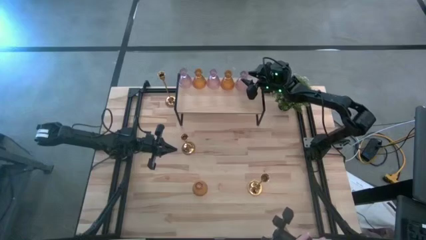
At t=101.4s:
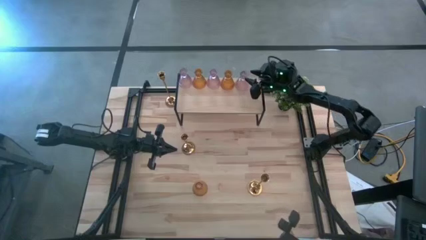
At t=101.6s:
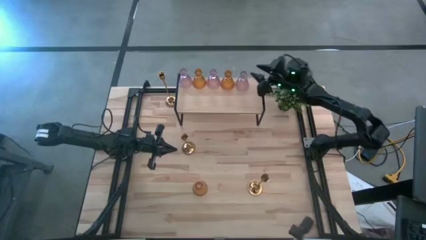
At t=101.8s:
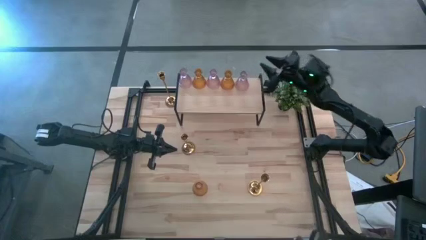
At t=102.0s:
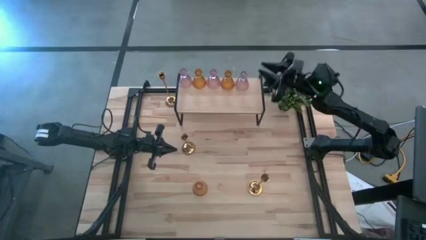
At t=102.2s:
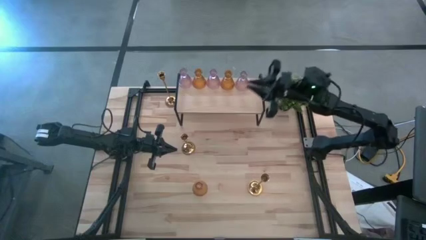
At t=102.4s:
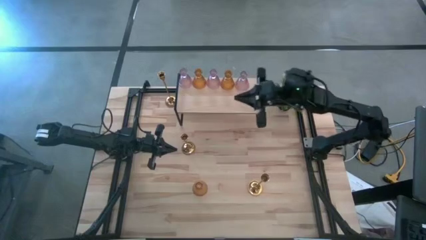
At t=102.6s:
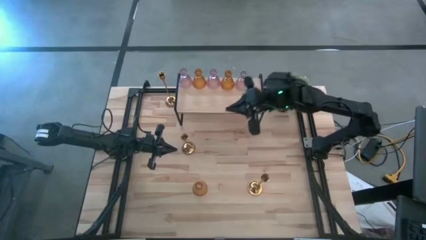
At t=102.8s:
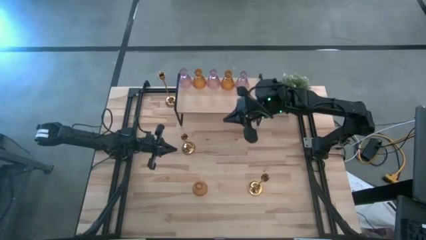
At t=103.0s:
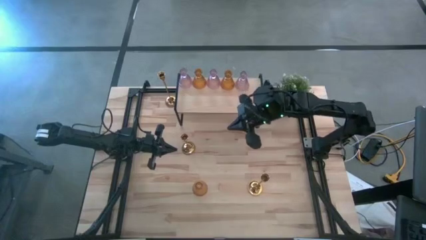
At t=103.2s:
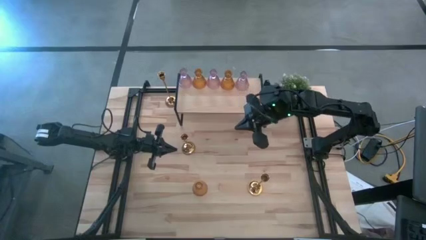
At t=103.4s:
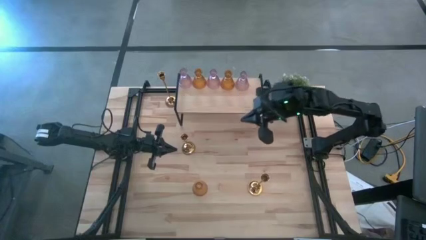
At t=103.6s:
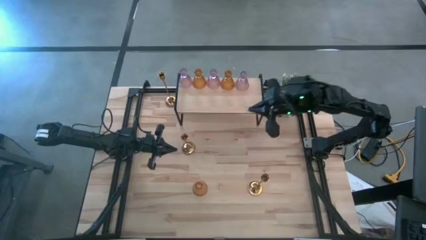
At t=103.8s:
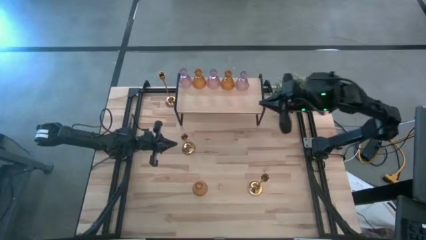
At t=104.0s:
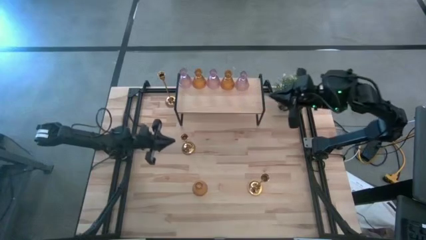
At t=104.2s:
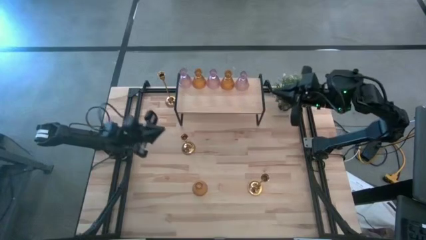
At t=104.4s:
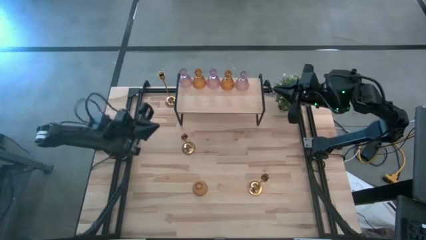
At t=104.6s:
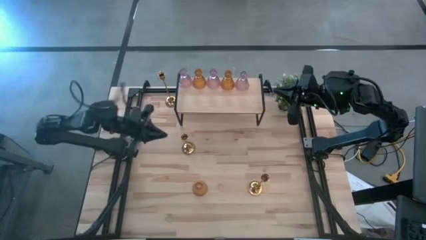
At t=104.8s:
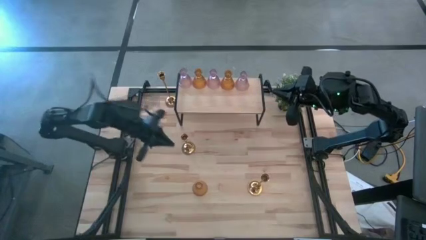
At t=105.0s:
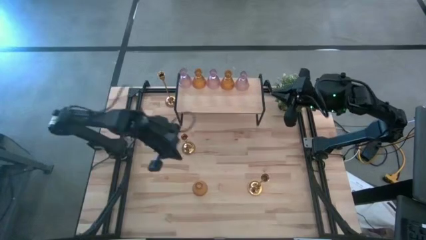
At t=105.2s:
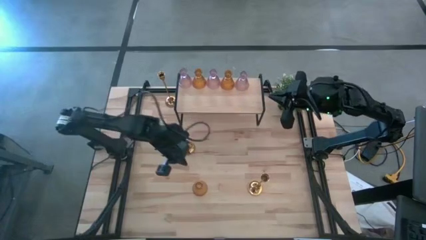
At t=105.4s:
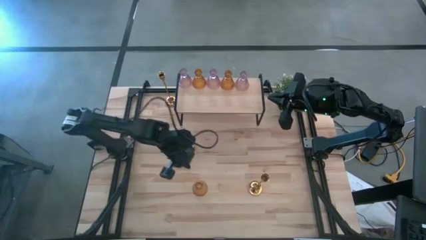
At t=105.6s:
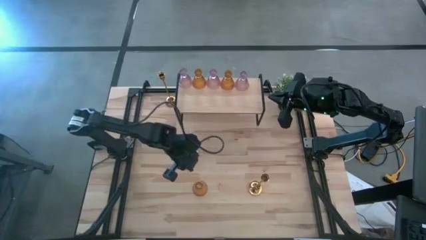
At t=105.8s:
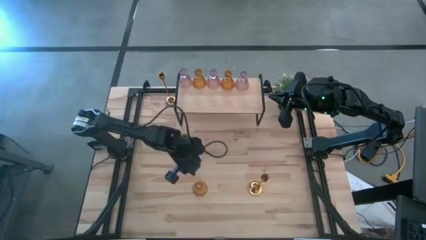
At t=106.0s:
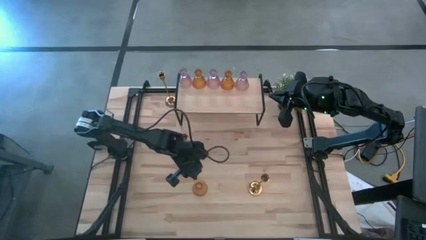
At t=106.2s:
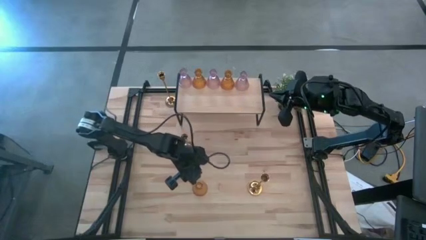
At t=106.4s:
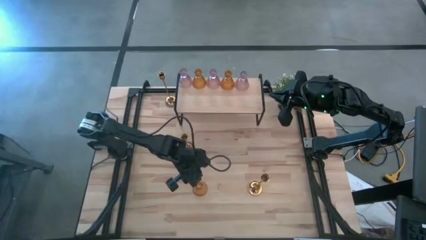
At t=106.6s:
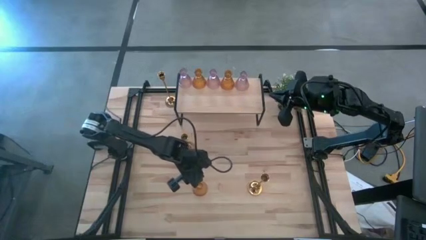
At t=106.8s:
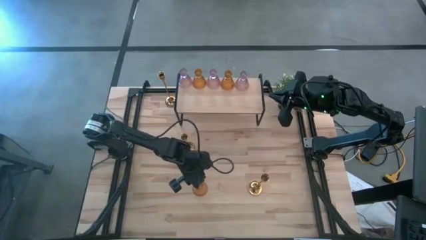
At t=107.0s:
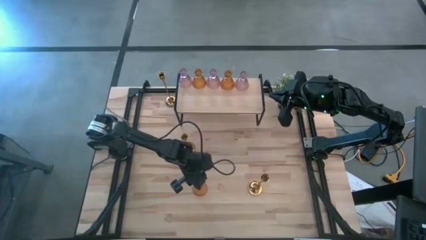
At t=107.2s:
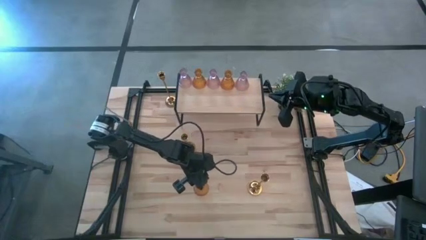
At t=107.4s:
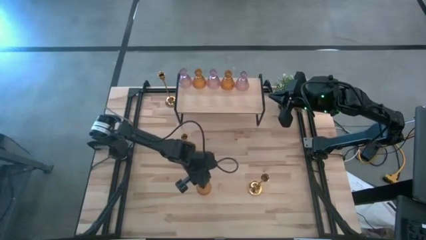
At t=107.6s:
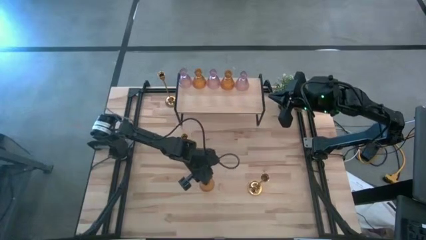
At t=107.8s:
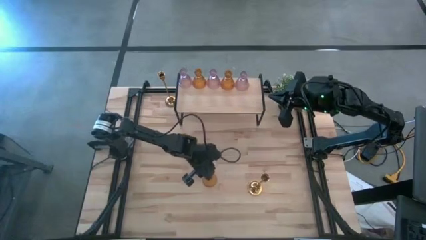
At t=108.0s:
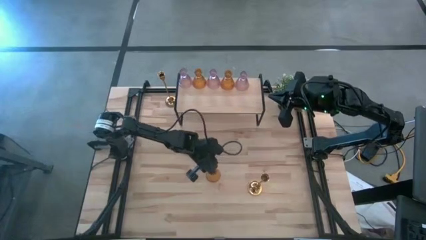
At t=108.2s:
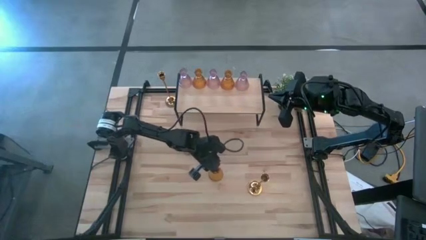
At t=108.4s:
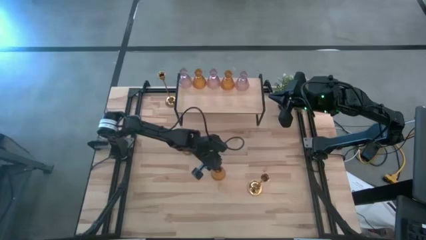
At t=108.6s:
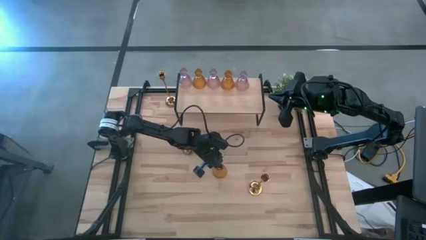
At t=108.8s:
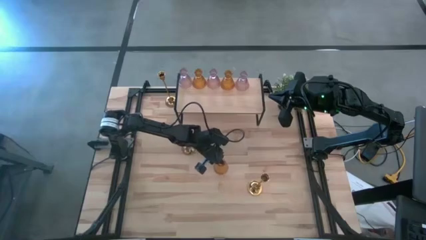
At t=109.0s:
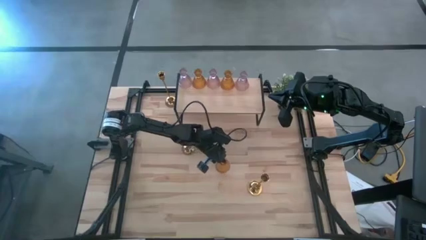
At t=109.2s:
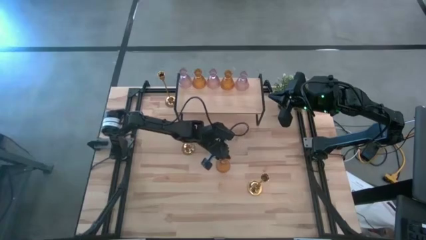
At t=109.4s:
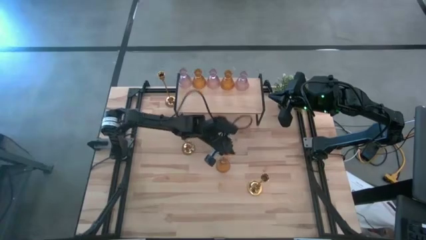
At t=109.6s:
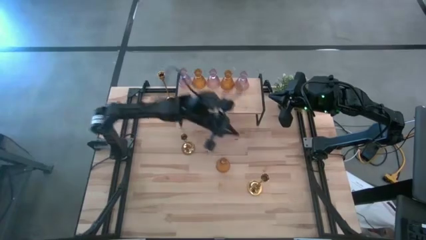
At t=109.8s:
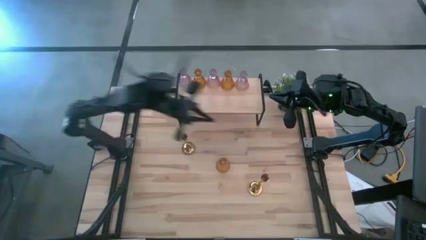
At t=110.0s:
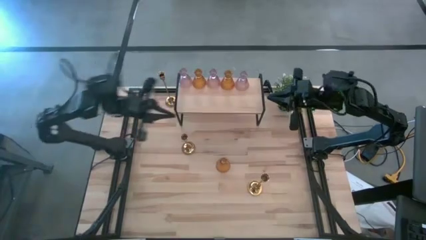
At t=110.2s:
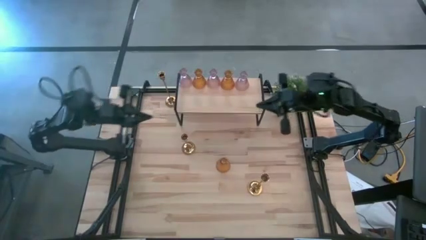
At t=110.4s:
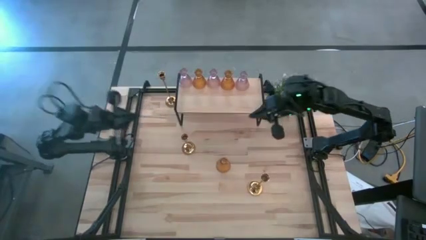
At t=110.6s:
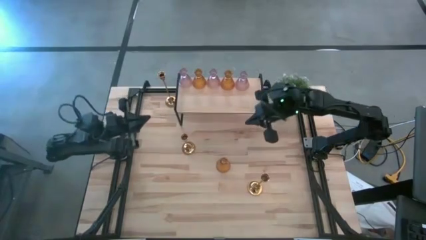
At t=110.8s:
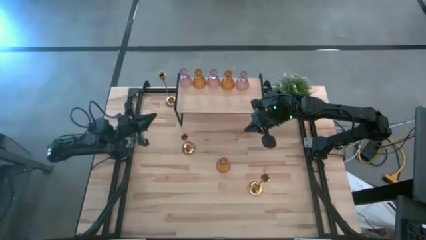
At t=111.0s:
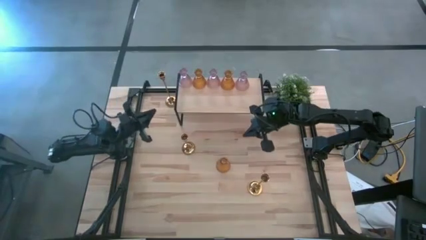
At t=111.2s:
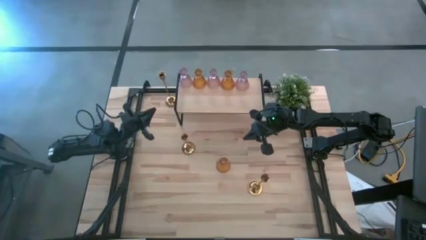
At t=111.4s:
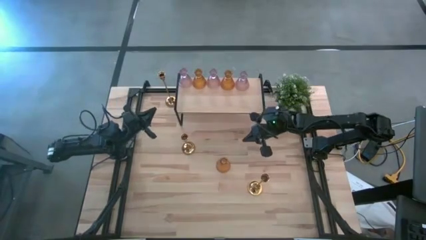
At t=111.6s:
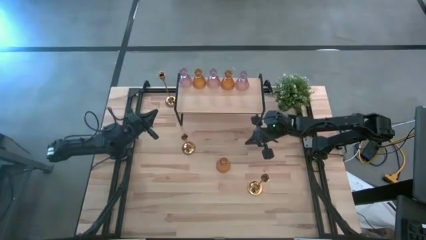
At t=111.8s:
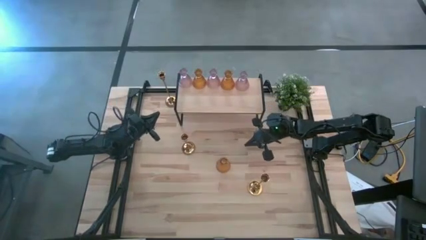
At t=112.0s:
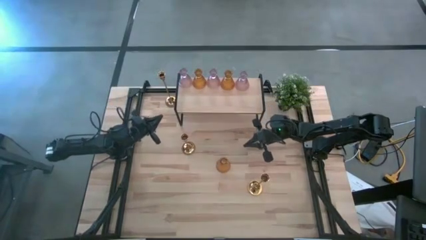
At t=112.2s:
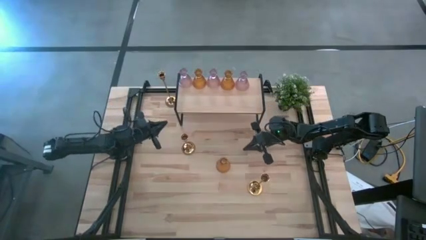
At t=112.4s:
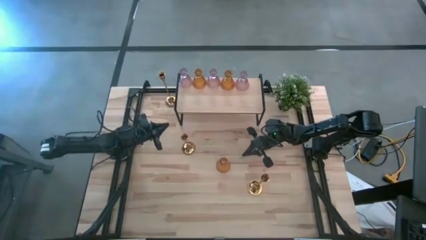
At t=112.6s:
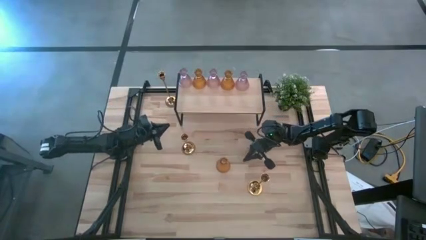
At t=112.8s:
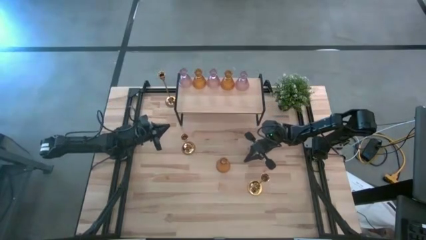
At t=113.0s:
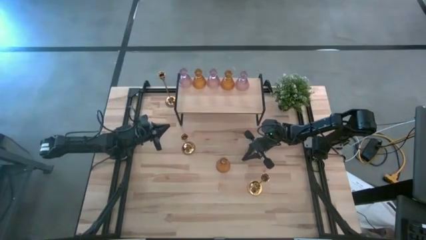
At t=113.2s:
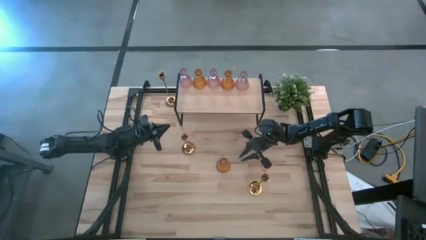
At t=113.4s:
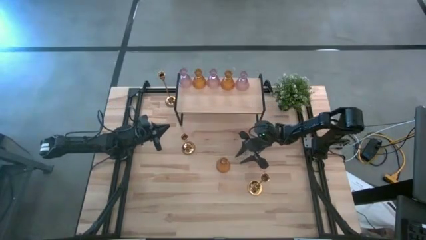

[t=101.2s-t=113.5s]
Task: Pick & Place candle stick holders
Put the yellow glass candle holder on the shelf aligned with the other glass candle holders

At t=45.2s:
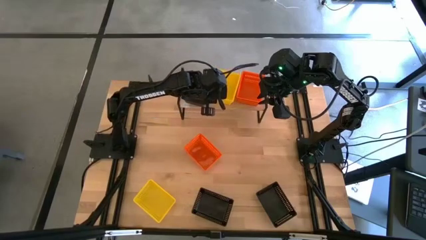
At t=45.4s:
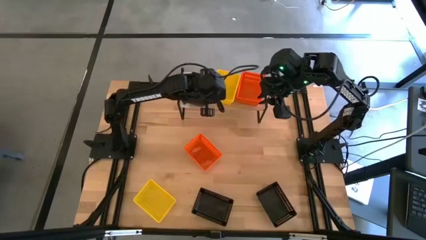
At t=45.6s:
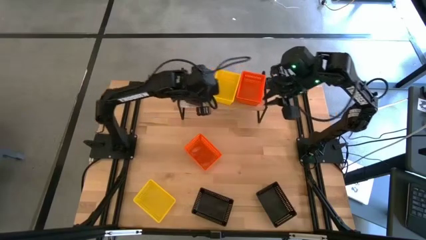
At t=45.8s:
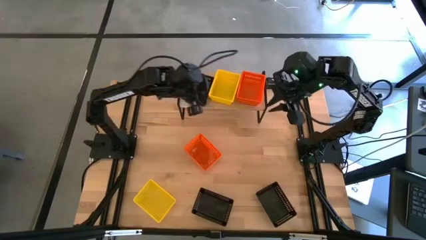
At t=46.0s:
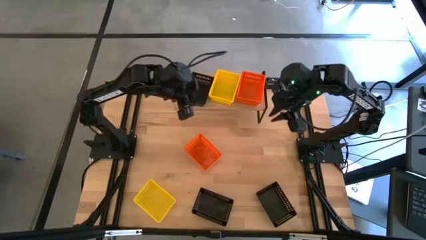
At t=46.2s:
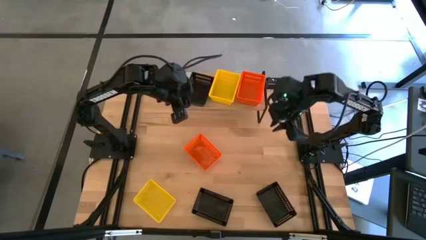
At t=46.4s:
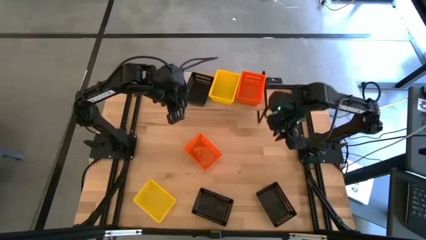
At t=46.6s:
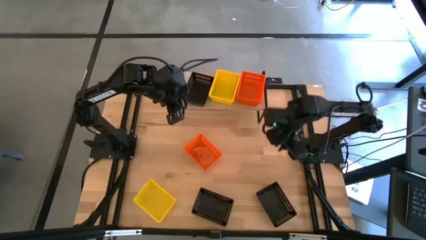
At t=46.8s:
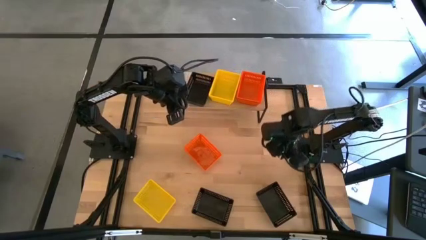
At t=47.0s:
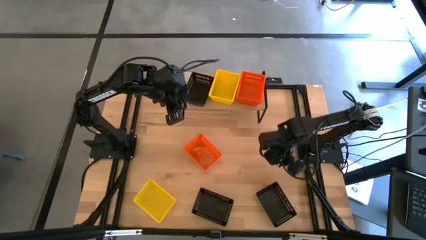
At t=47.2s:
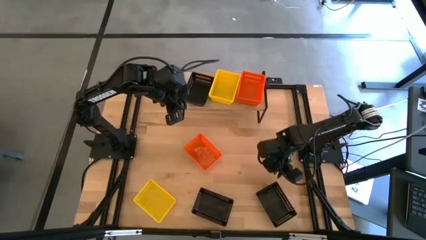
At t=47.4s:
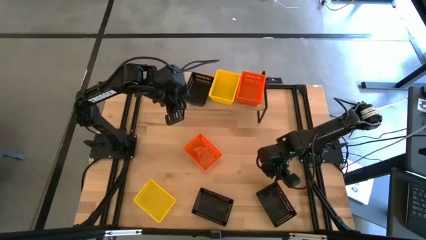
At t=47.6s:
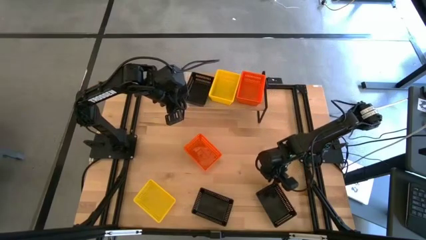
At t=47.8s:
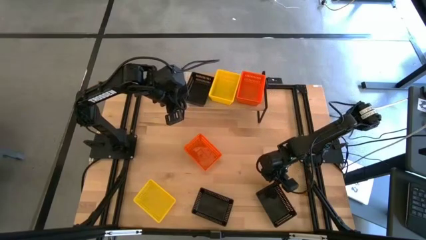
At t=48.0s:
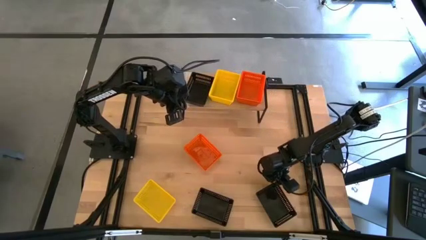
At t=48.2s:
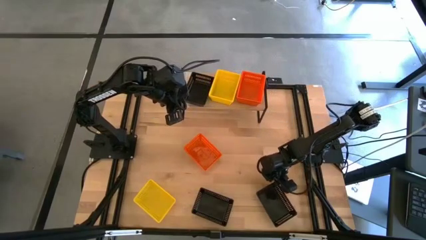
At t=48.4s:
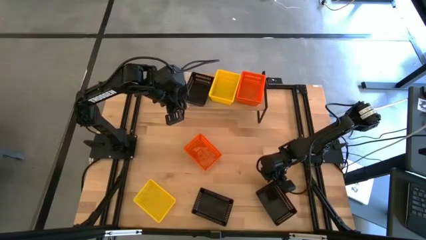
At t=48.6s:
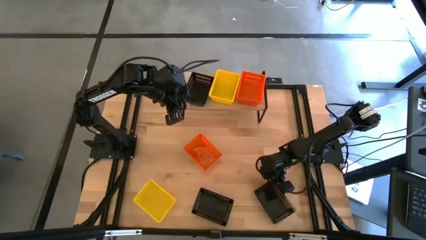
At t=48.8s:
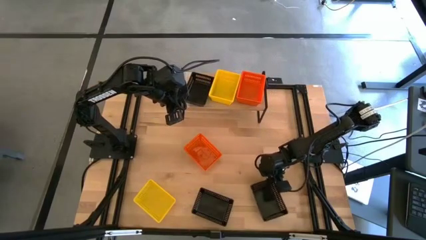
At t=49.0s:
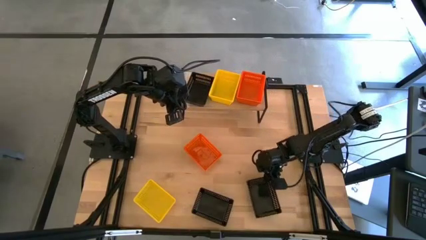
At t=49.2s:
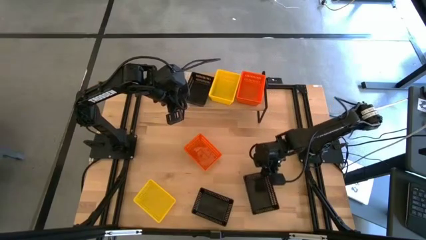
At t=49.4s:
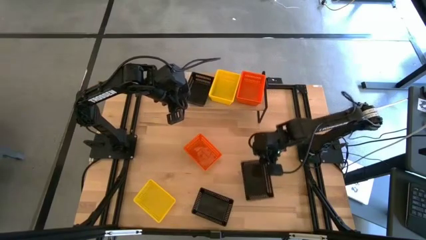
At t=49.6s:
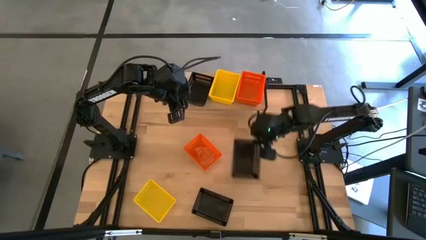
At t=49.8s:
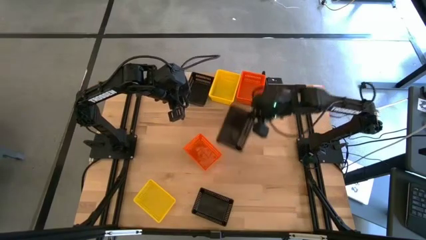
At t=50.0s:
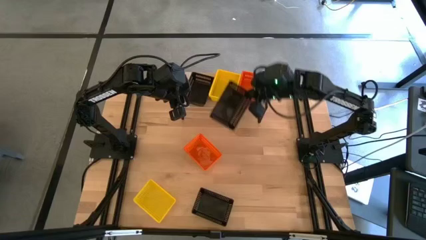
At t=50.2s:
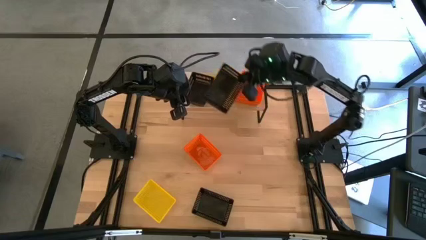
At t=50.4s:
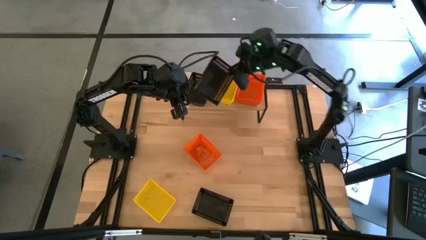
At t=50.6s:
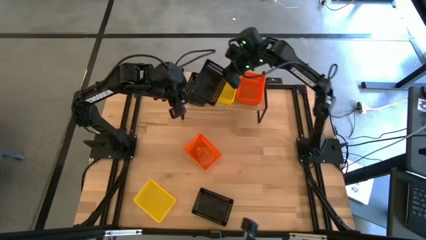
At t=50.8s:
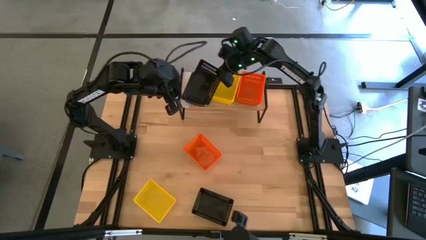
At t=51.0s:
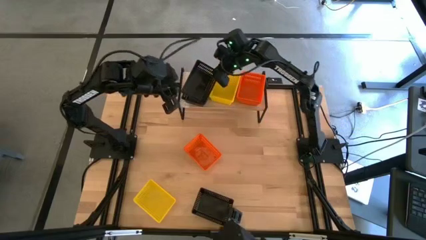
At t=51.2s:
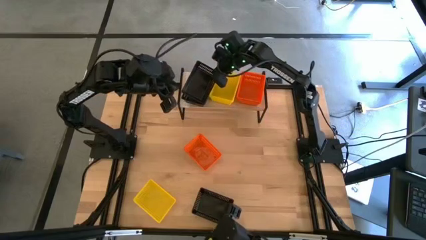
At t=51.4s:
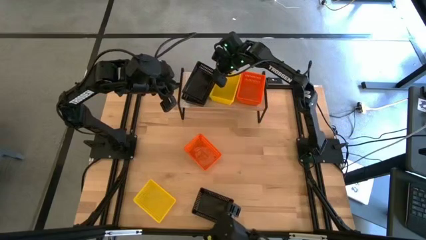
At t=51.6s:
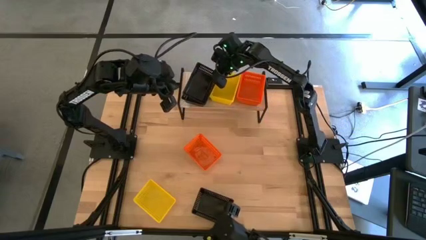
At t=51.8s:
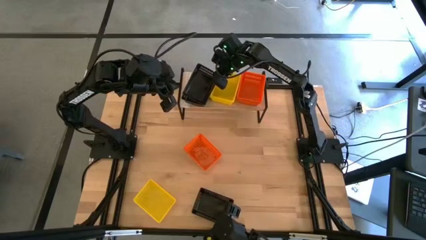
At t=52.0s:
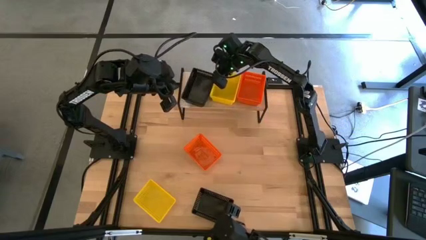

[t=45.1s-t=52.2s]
Task: Stack baskets on shelf by color
Stack the right black basket on the black basket on the shelf
